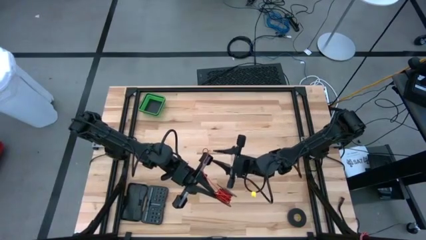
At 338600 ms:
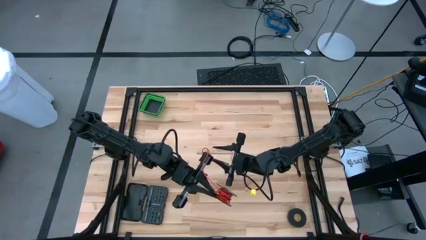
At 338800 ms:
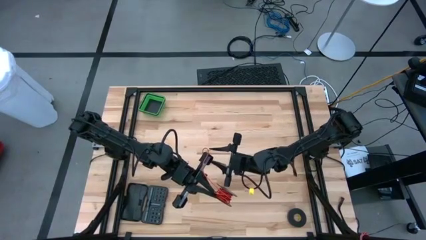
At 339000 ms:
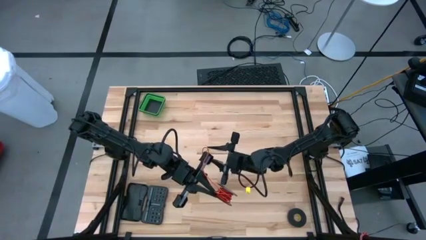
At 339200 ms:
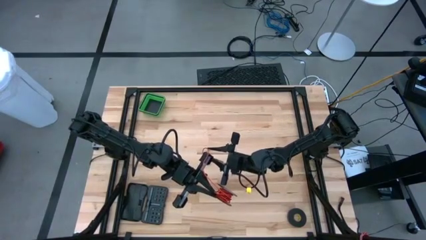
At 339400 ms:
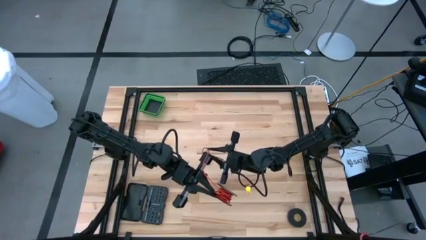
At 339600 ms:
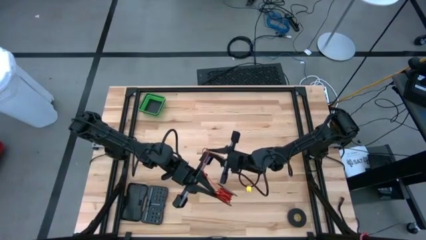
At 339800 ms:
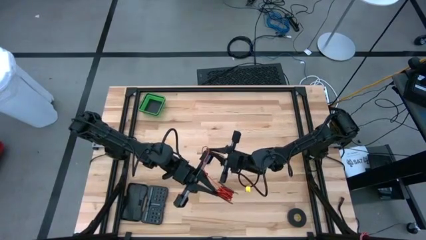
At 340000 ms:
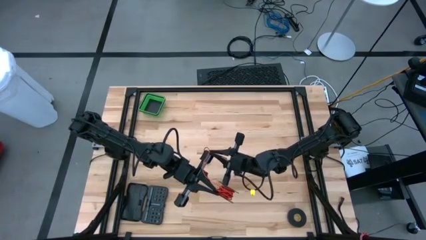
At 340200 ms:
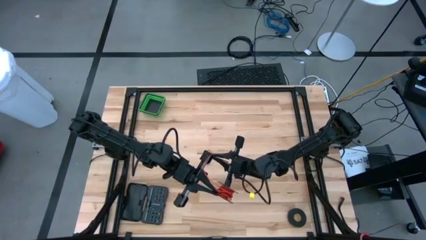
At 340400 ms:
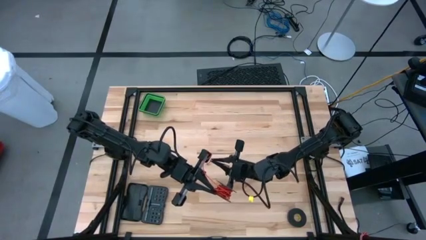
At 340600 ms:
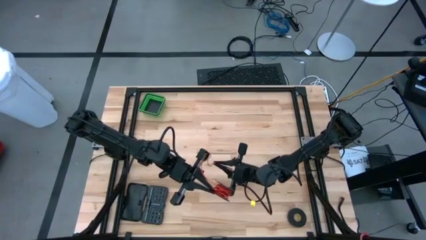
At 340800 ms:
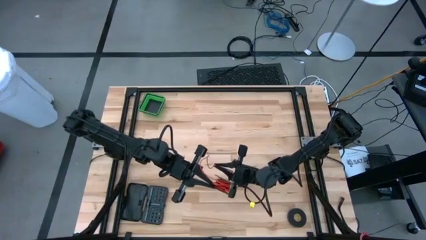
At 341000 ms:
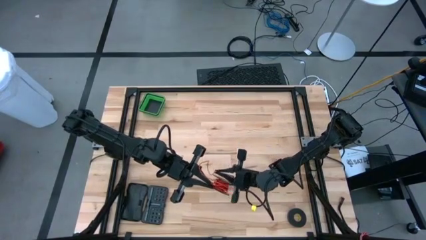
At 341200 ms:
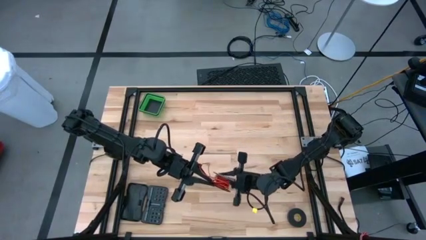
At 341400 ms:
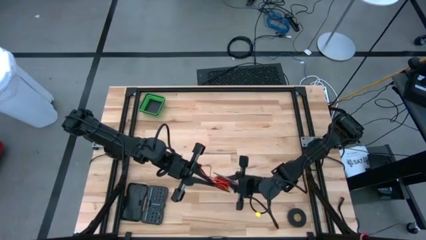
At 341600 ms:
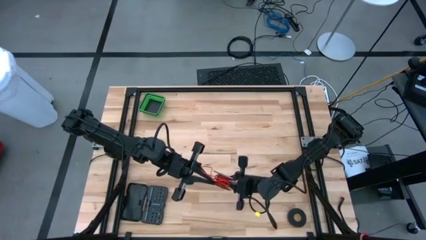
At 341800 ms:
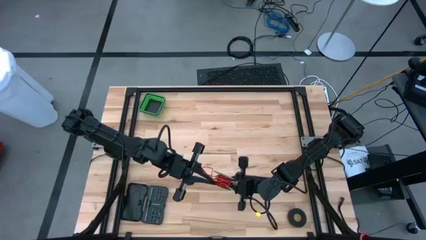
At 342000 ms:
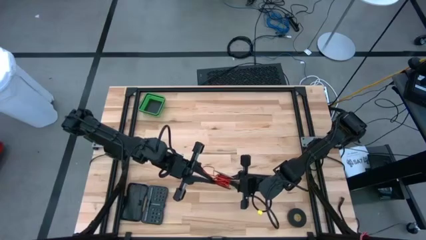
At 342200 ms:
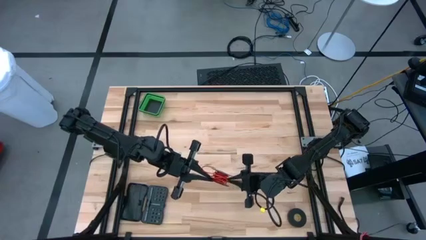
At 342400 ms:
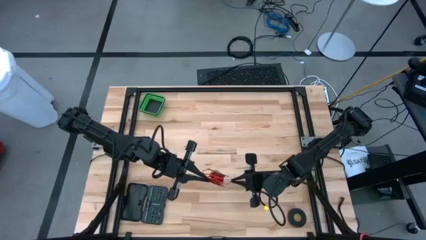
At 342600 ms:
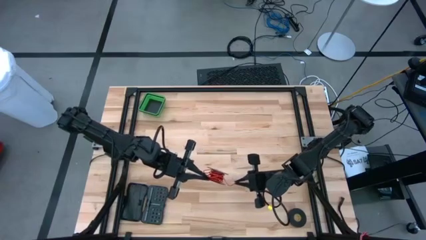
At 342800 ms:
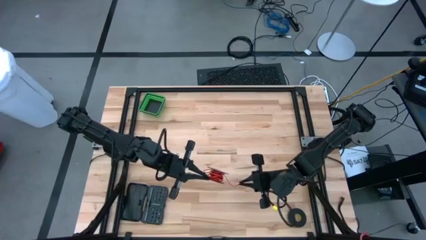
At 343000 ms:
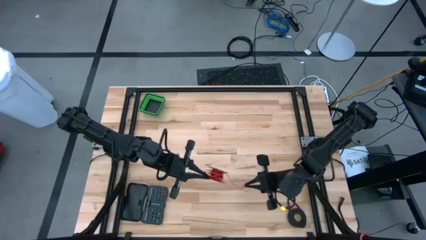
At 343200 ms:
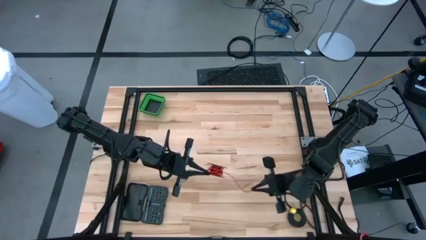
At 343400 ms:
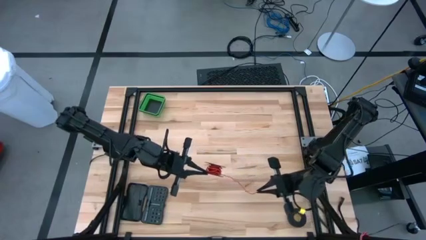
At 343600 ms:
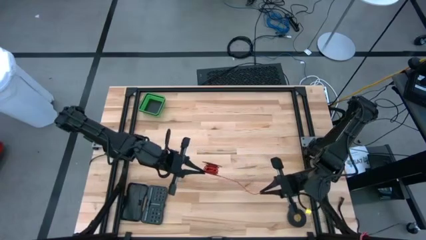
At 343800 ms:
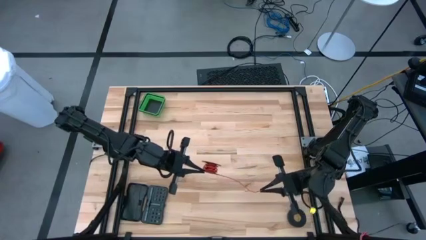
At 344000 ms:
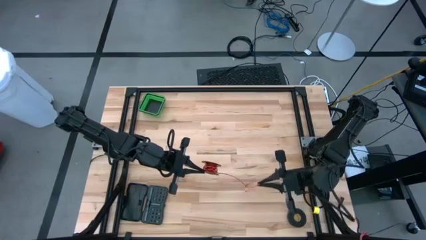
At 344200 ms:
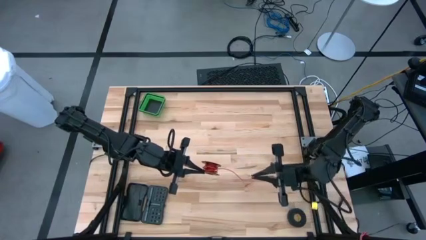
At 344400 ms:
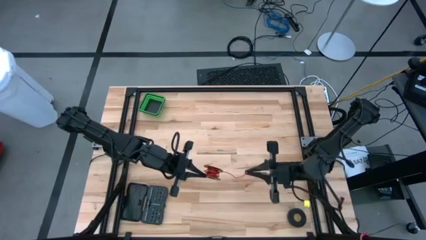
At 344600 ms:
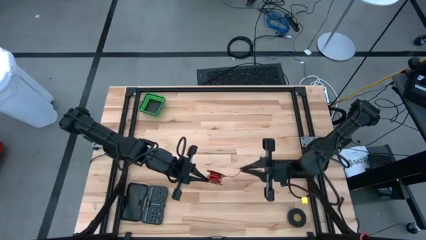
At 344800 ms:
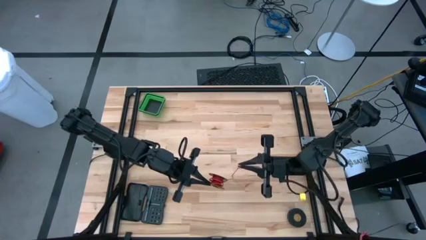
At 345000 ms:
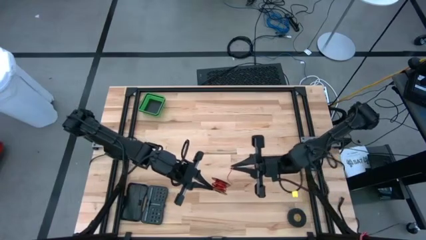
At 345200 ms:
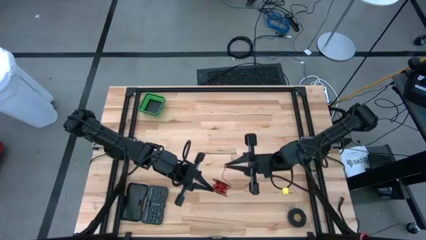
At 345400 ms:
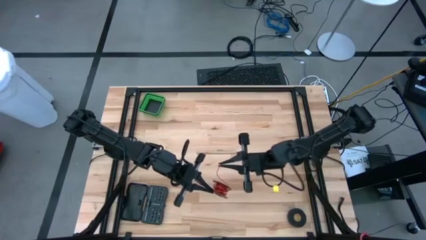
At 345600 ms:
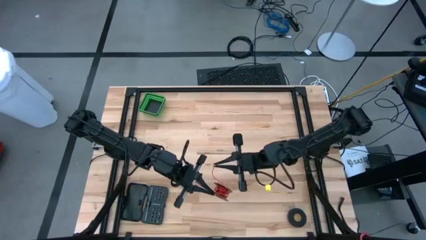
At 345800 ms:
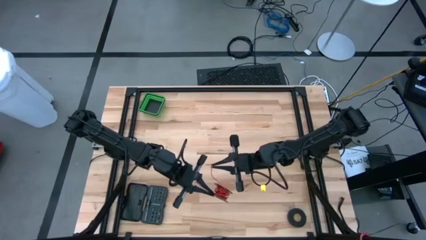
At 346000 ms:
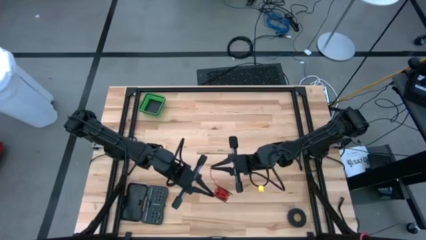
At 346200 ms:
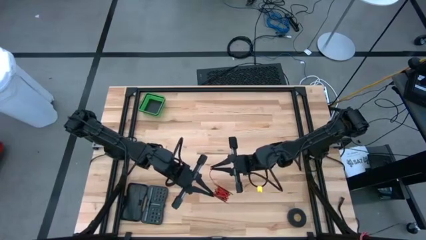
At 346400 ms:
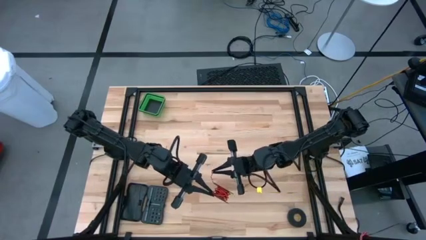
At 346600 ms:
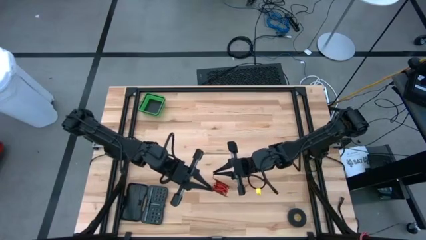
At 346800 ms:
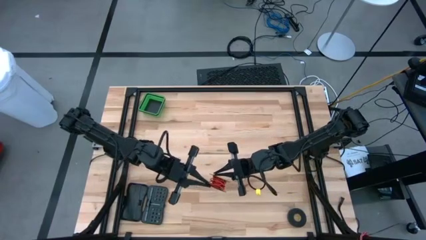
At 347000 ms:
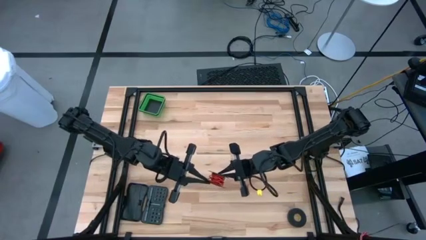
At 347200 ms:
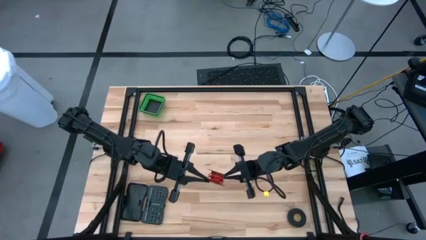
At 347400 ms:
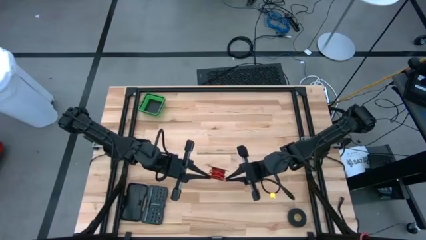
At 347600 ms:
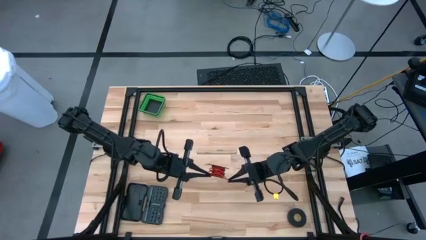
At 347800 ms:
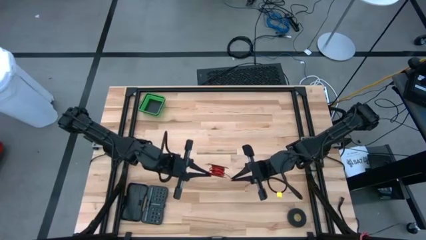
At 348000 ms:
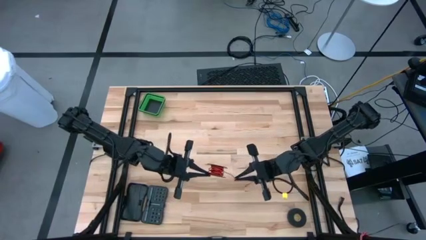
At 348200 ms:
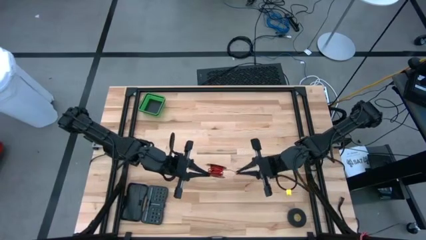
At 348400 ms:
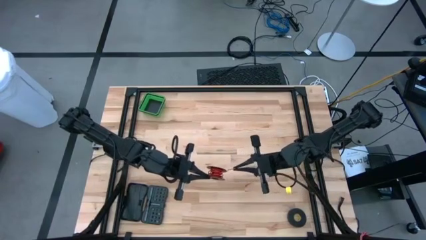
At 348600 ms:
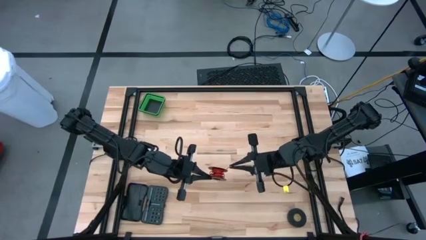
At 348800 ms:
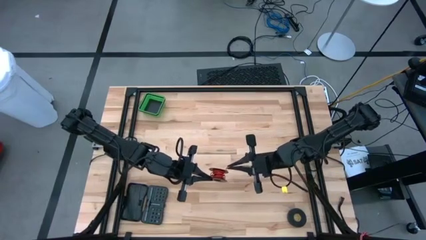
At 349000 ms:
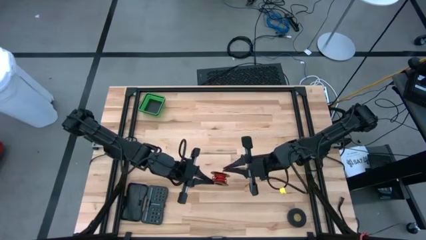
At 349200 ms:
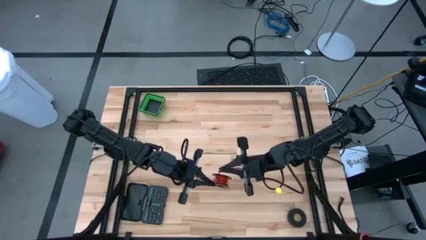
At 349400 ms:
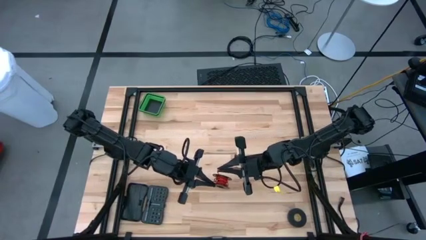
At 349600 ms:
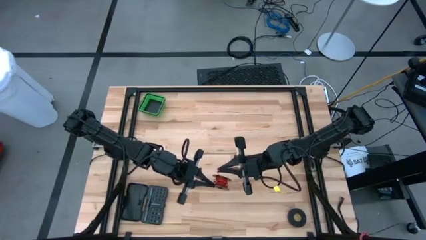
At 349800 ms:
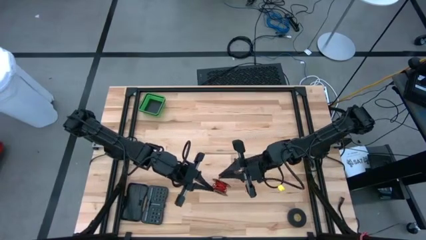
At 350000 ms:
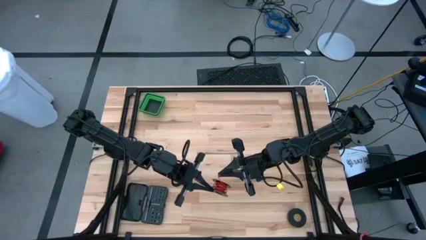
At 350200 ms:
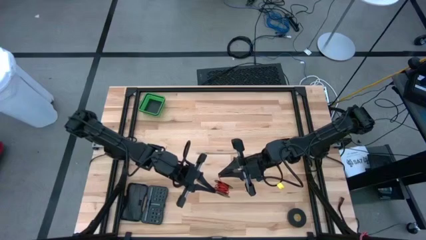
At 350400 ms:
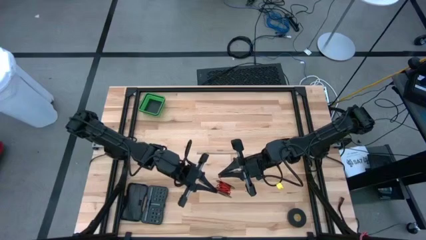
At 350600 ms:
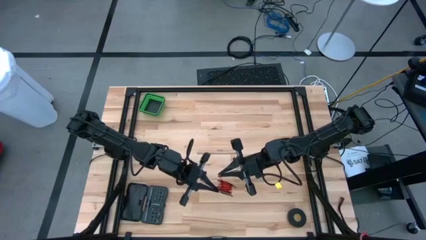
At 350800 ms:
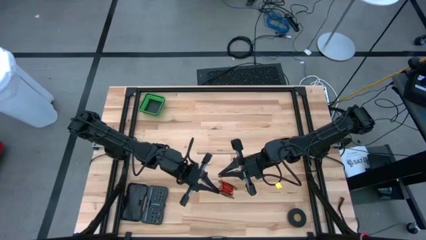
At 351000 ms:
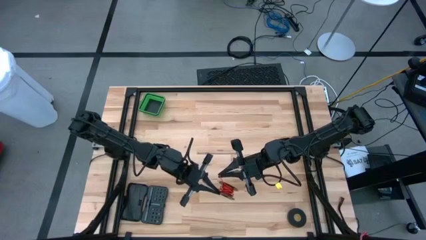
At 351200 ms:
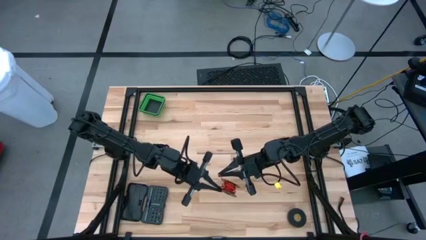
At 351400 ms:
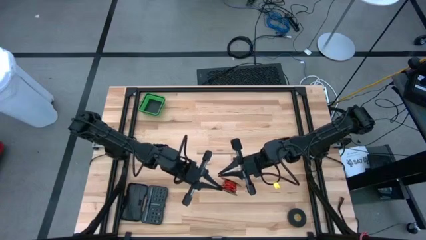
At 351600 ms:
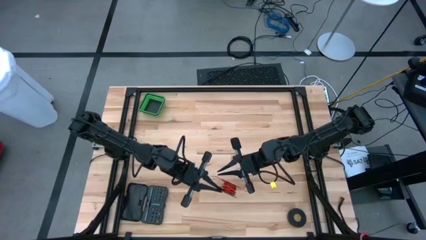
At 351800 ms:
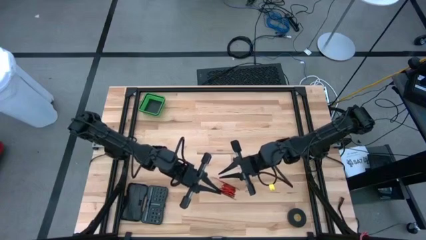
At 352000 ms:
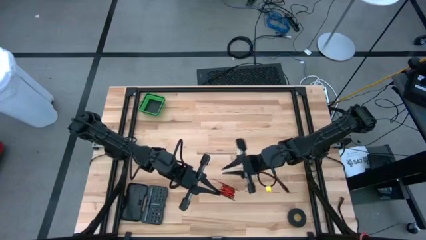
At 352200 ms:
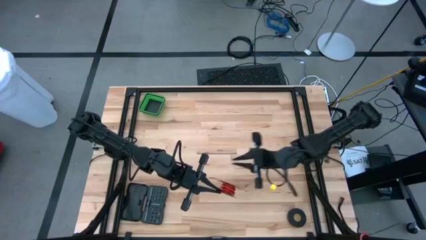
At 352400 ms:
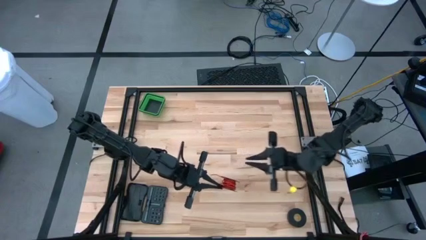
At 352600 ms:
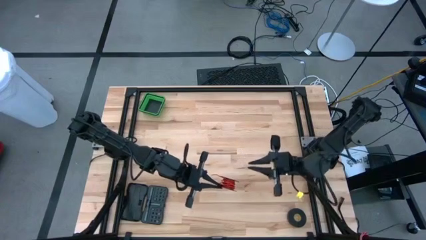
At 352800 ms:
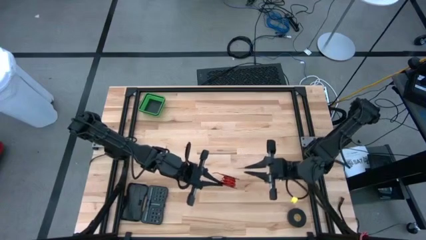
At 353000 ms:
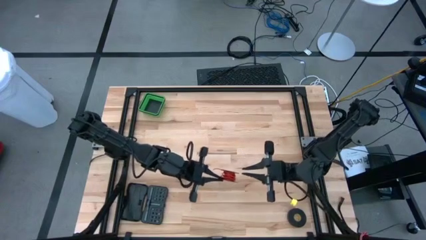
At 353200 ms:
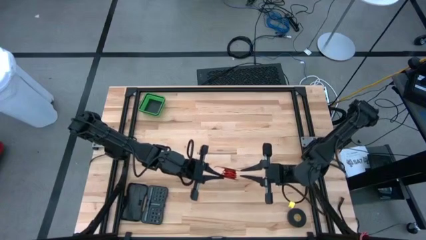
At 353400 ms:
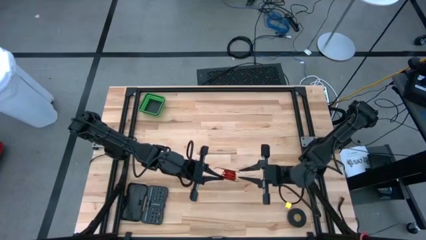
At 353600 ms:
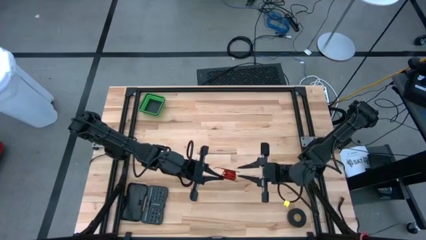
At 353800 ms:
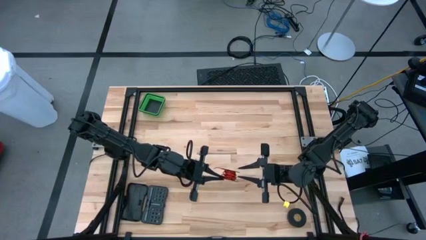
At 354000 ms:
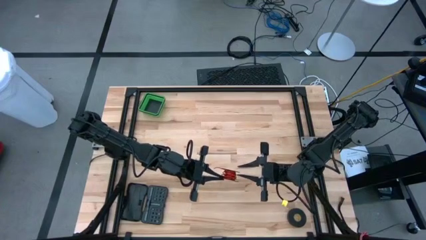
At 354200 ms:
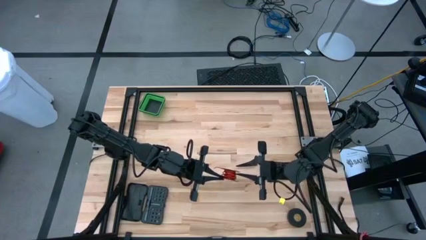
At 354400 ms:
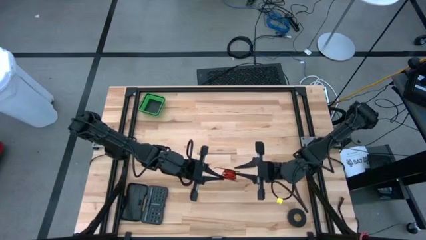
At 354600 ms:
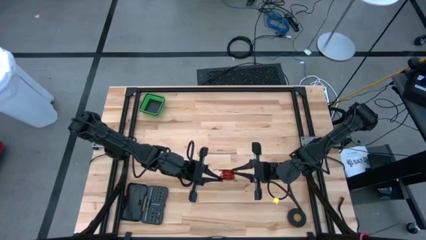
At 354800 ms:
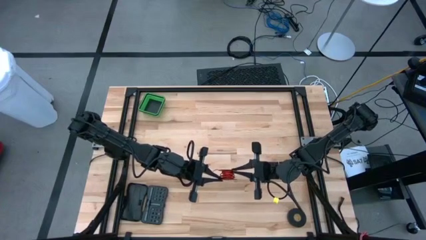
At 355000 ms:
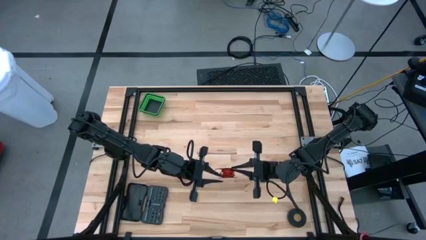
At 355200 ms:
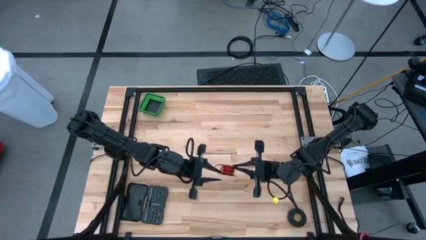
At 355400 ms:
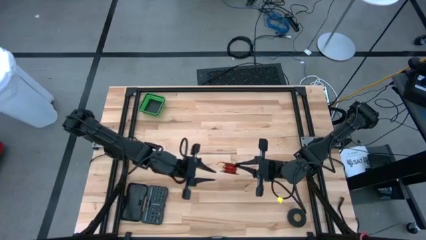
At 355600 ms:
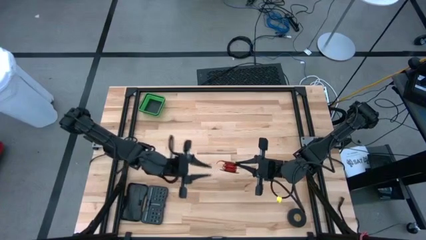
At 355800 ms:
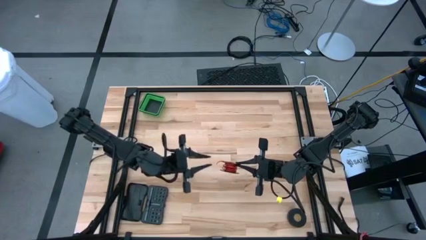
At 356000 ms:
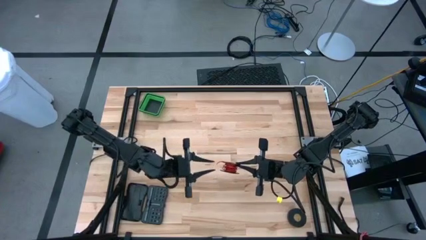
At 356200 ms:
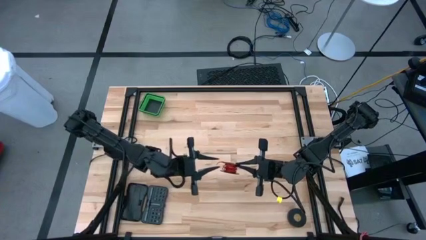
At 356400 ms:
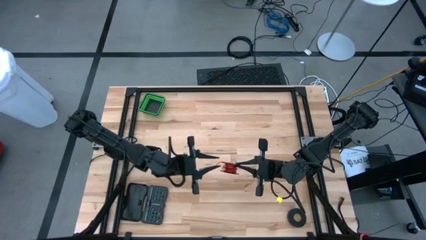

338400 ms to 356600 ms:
Task: Coil cords
Coil the red wire into the spool
